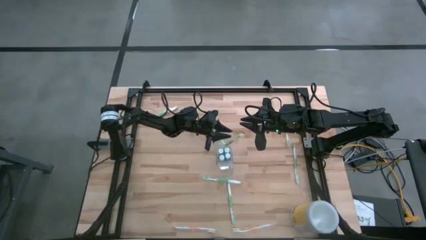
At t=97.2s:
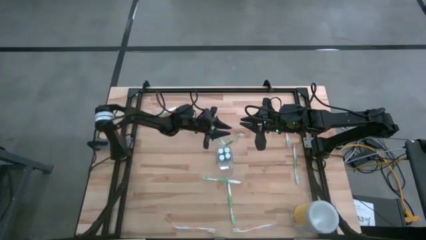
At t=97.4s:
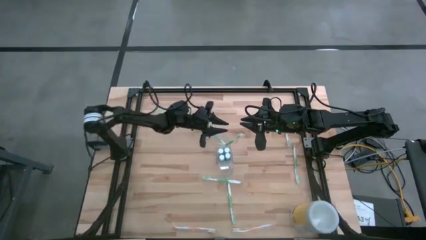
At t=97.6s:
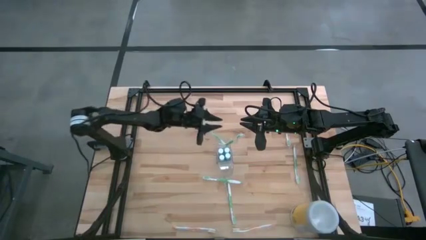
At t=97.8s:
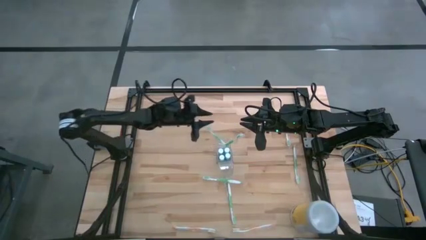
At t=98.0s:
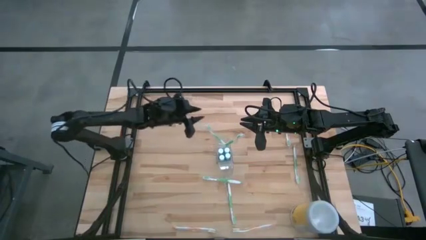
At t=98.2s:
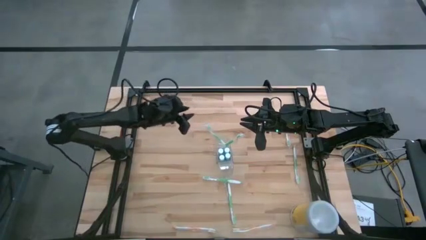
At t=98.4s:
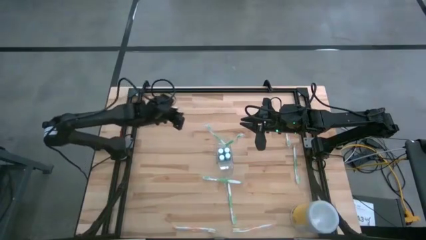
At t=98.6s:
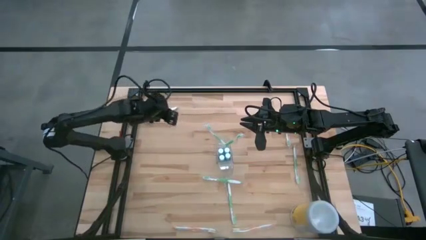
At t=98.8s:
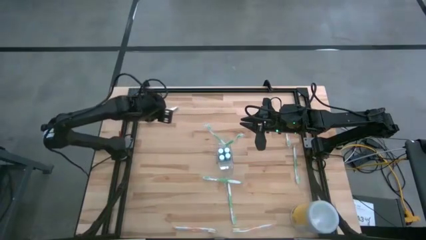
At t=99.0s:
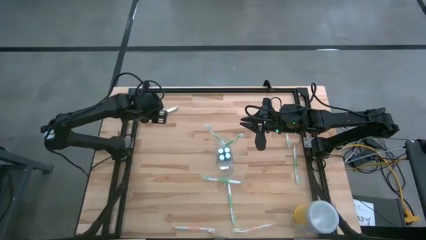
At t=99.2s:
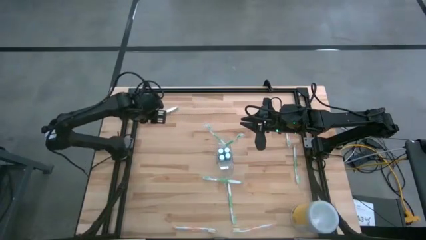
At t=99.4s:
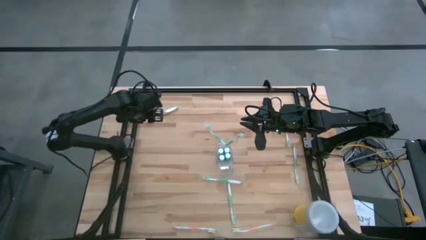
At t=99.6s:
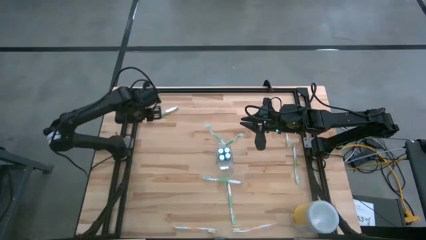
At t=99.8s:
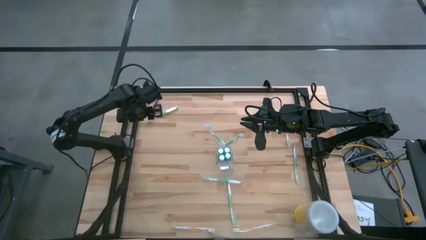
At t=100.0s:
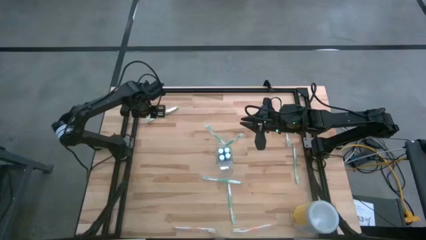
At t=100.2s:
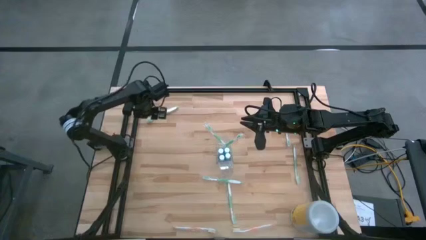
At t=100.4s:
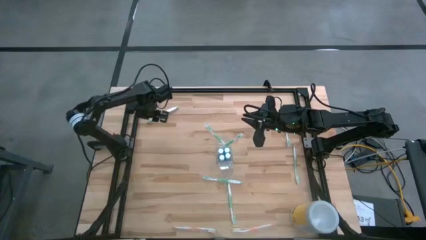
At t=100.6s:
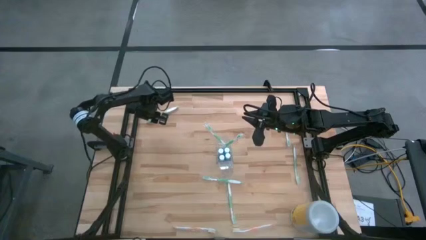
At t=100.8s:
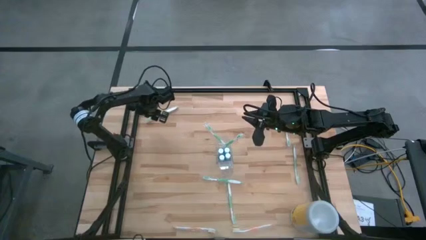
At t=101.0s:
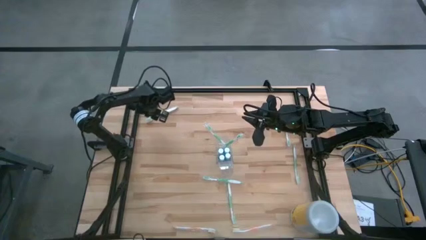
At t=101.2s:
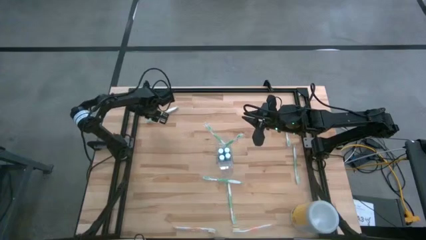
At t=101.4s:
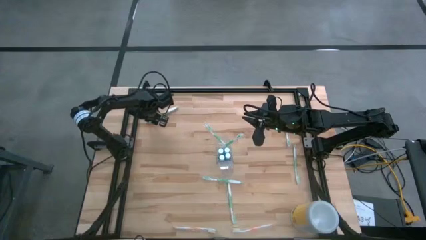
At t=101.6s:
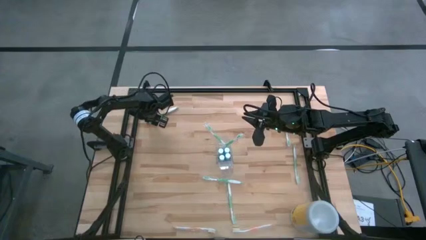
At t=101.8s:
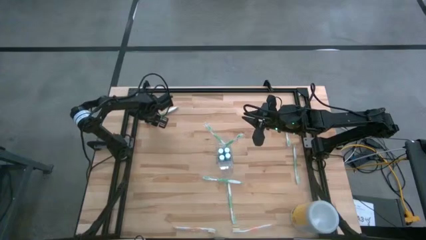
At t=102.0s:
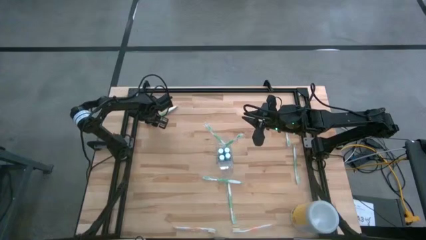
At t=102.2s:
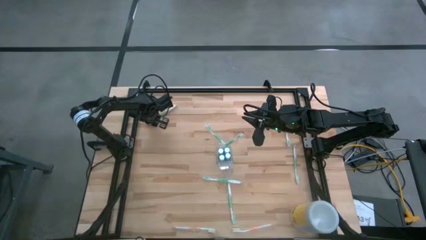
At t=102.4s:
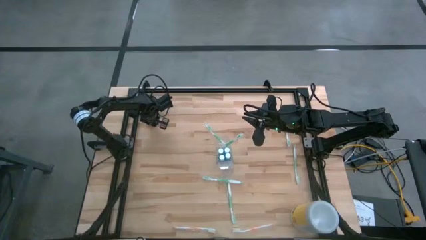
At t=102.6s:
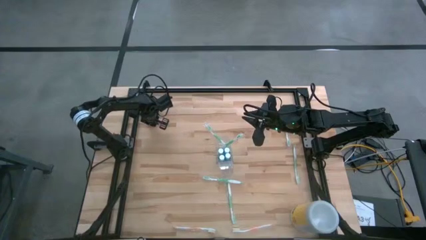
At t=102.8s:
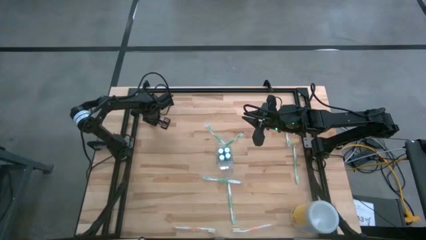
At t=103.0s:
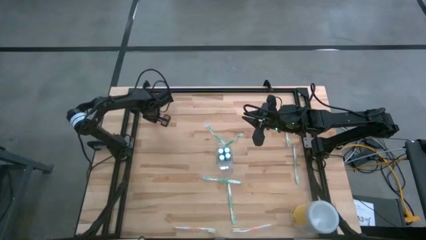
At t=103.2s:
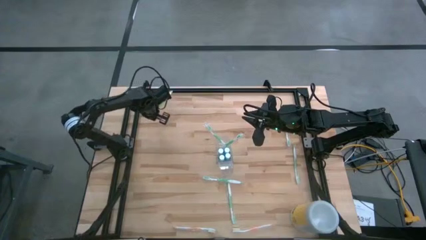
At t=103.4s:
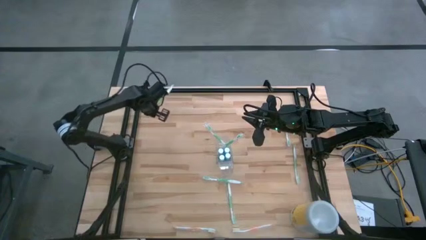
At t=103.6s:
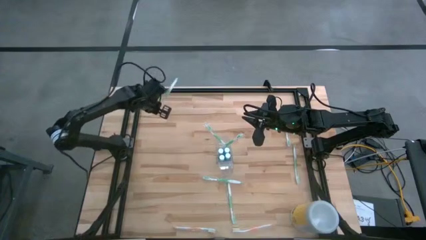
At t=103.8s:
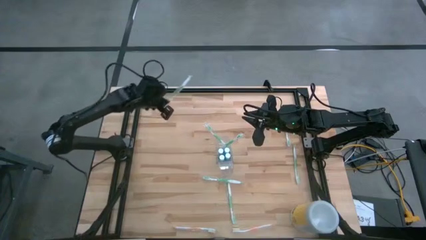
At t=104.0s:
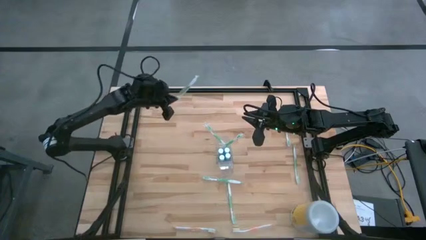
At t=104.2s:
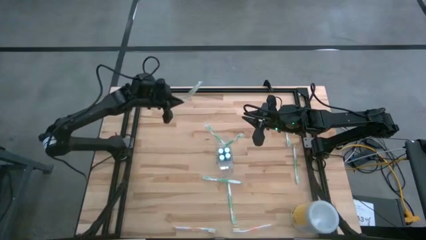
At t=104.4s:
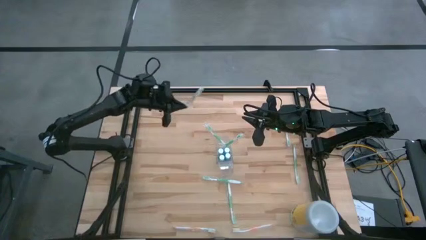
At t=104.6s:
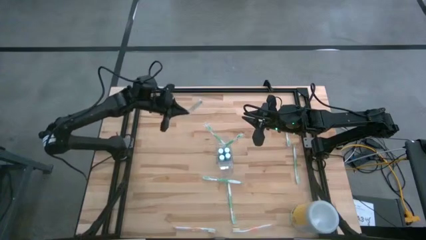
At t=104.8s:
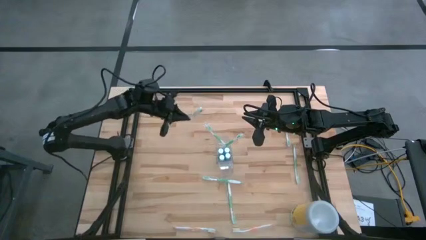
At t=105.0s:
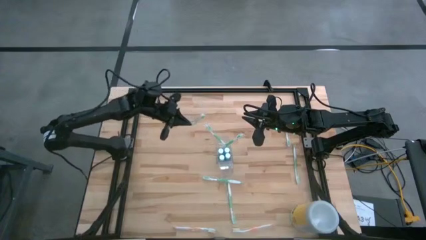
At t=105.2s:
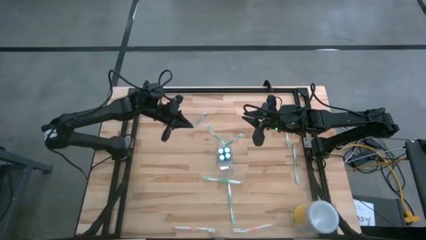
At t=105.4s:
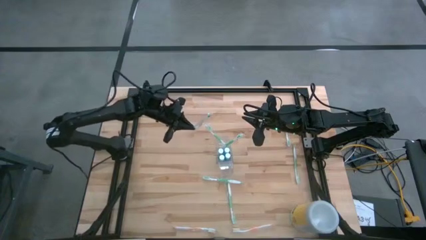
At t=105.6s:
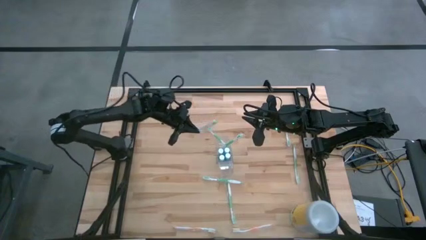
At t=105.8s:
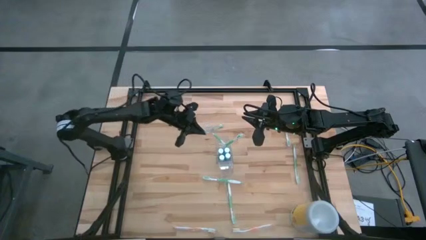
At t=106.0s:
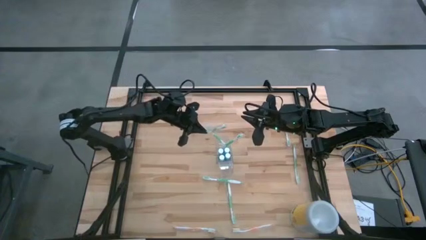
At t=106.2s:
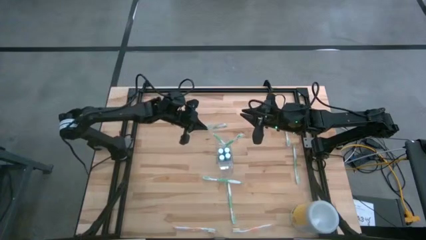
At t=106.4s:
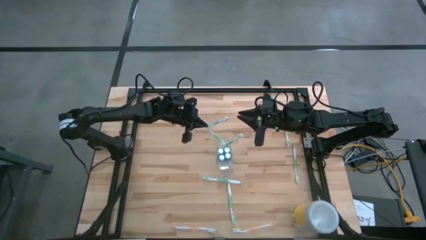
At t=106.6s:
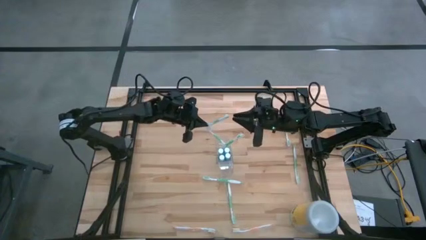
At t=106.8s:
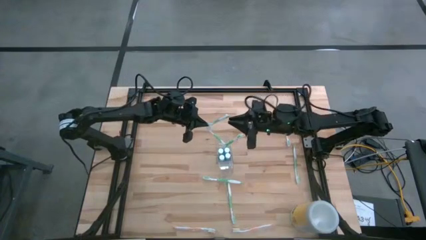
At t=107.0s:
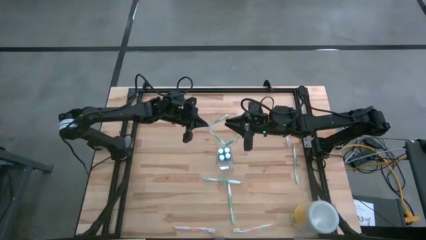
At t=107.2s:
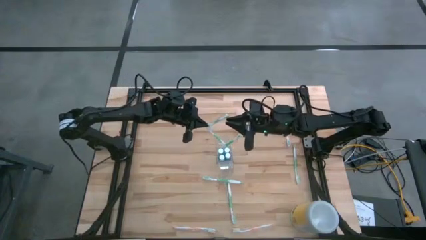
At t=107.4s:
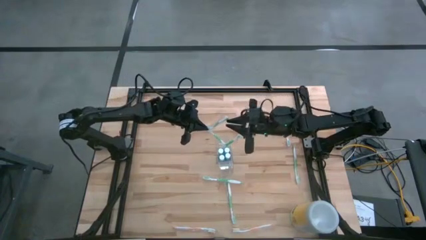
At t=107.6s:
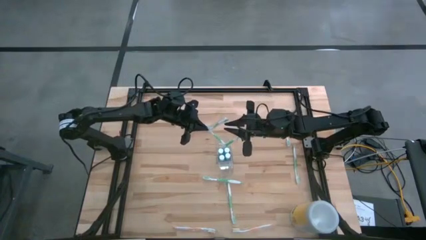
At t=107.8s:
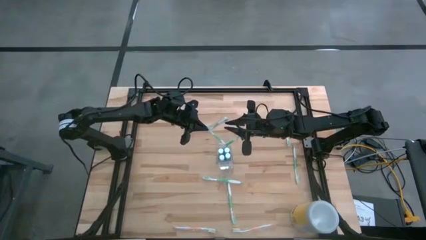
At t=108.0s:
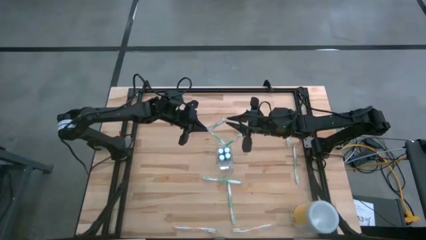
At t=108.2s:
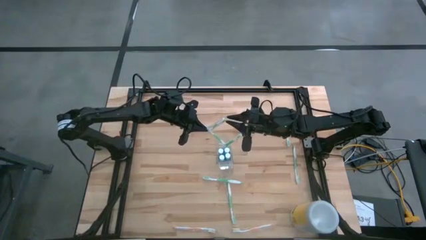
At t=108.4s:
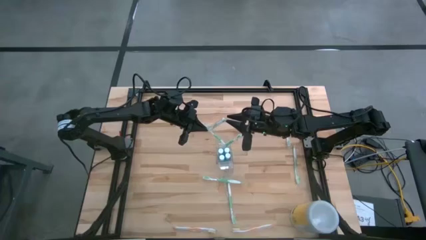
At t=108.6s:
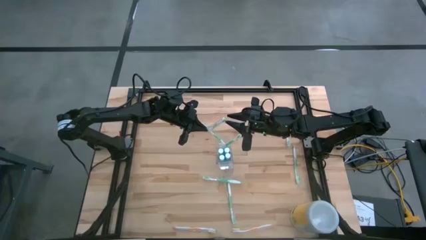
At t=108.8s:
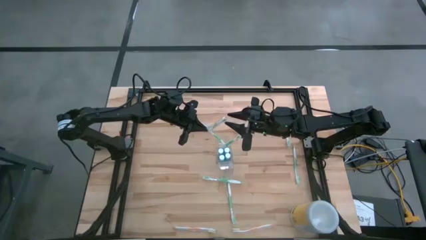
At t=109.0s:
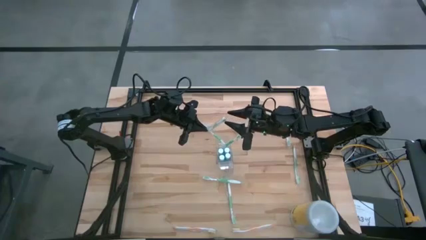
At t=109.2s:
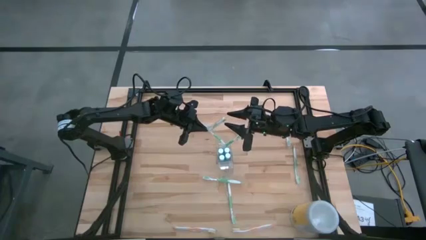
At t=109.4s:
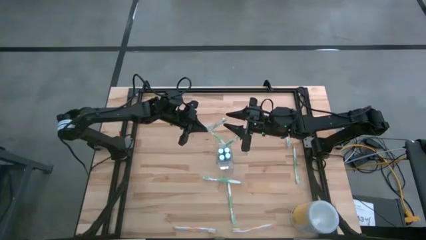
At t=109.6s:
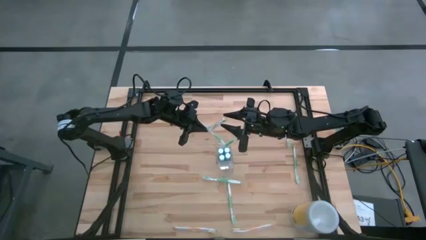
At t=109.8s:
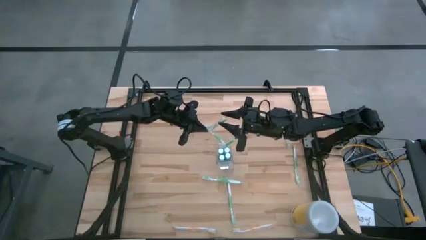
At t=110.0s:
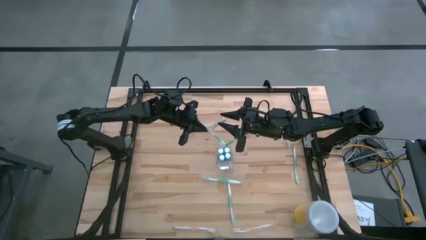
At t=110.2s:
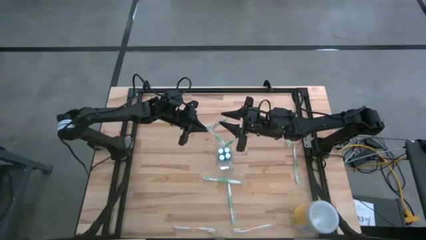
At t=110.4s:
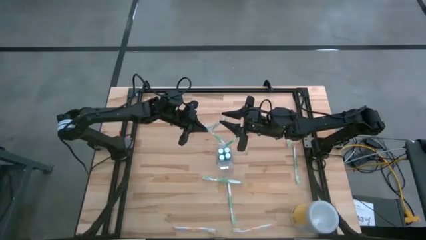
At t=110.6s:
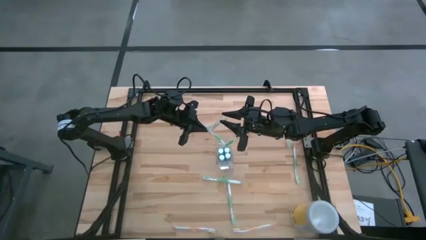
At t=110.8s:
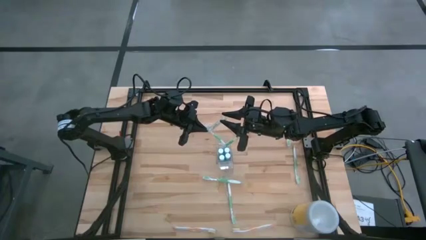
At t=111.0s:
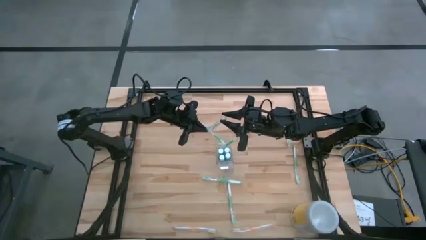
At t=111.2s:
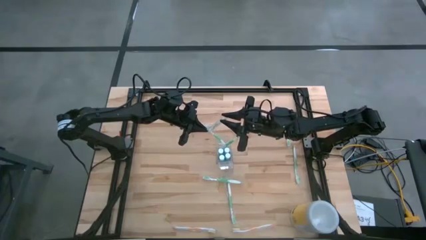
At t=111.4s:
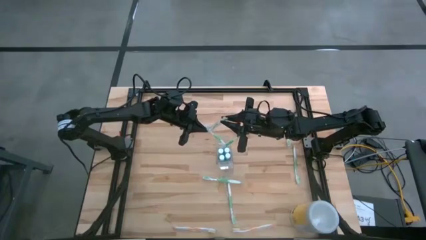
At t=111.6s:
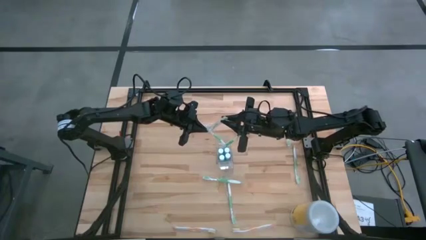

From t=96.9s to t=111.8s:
Task: Pick & Place toothbrushing station
Put the white green toothbrush into the back side of the transparent organizer

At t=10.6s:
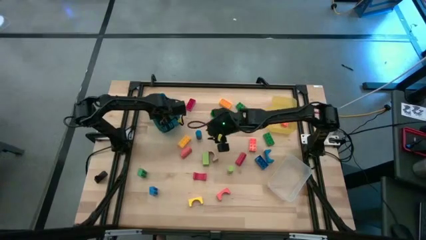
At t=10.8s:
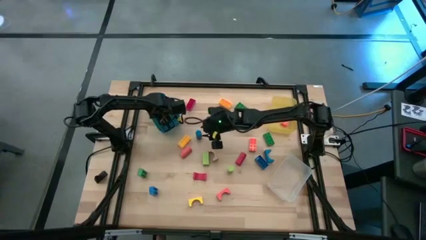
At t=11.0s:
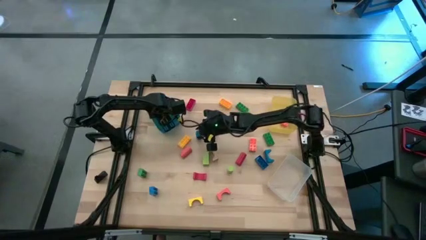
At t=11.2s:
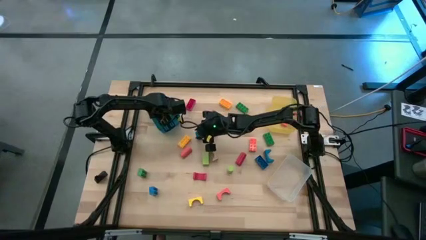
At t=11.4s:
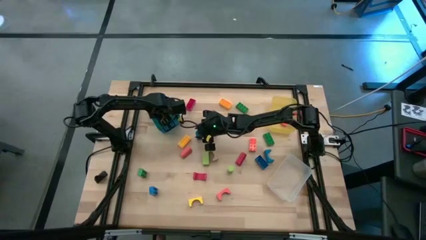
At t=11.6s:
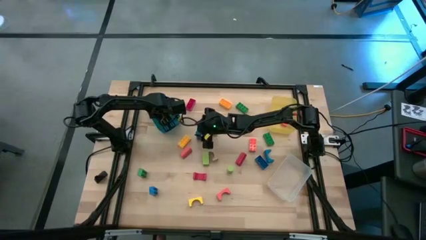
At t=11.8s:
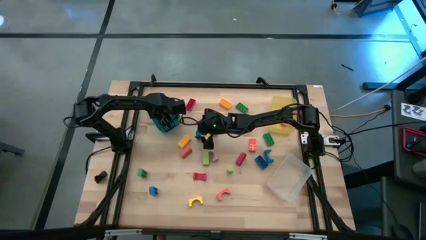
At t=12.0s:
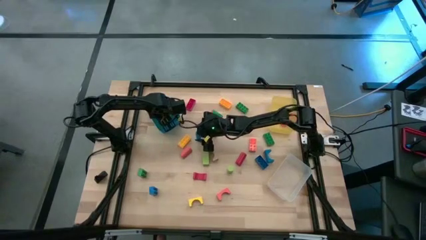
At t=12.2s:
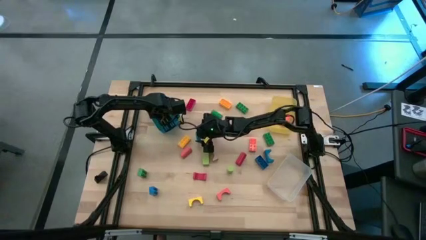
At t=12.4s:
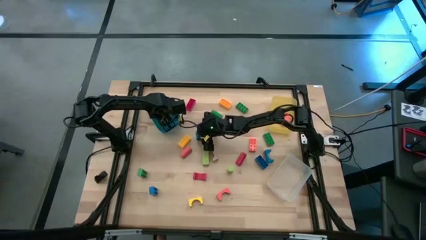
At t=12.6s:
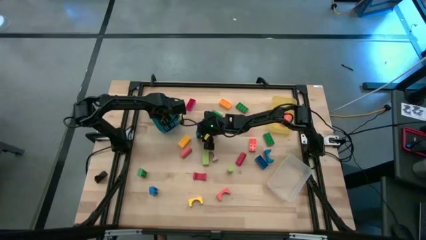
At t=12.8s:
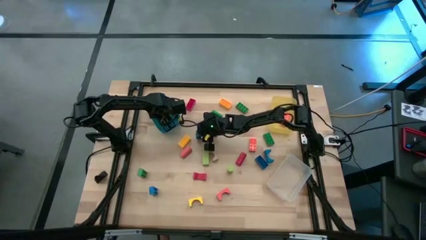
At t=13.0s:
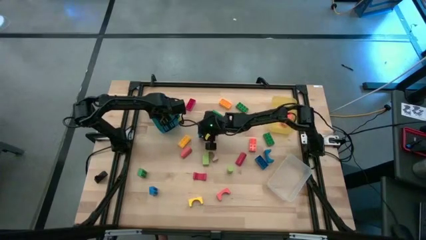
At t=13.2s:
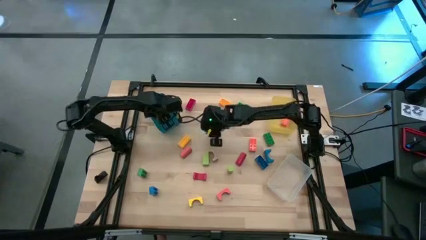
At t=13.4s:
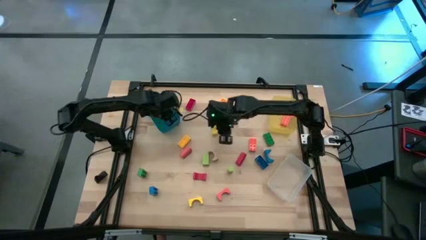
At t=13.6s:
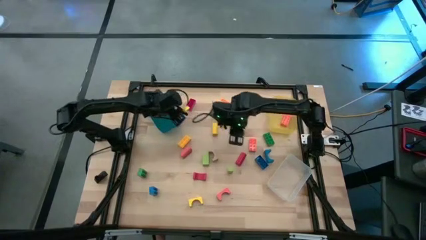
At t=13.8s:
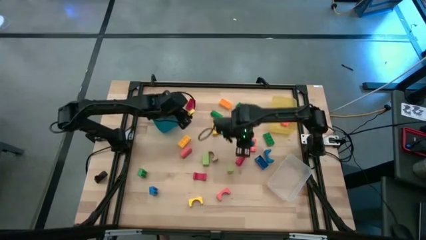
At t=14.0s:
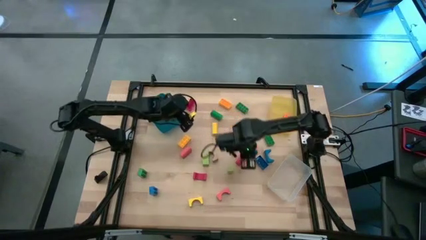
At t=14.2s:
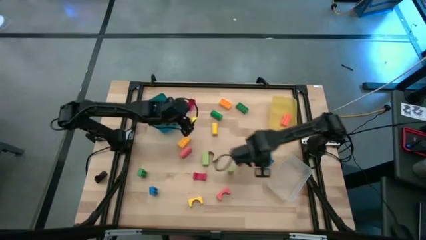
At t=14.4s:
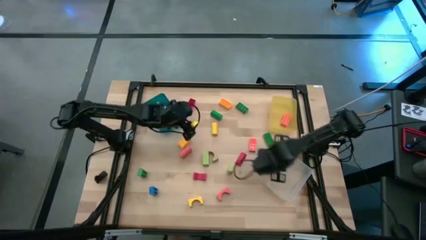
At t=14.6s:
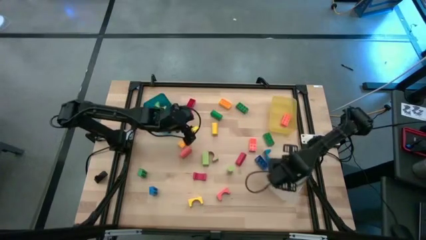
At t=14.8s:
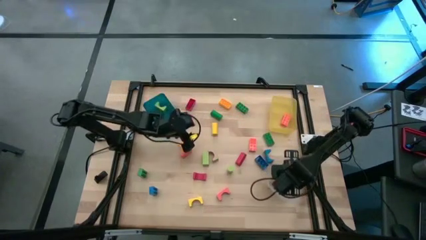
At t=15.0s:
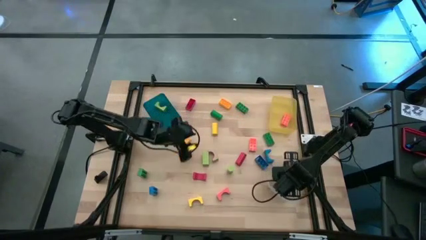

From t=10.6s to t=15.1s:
Task: Sort blocks by size
Put the blue cylindrical block into the transparent bin
